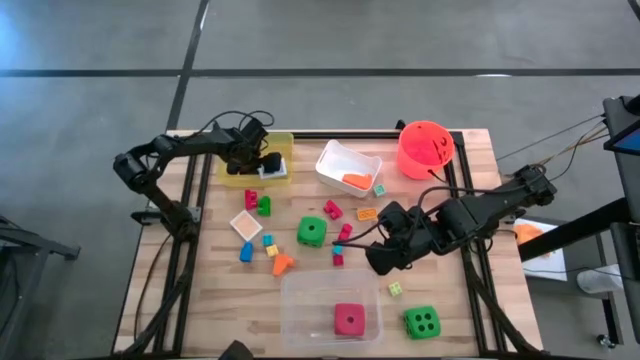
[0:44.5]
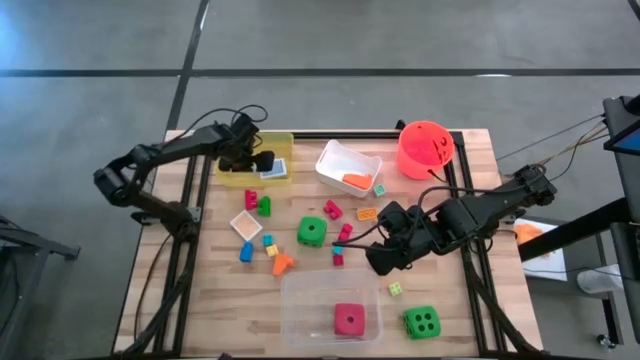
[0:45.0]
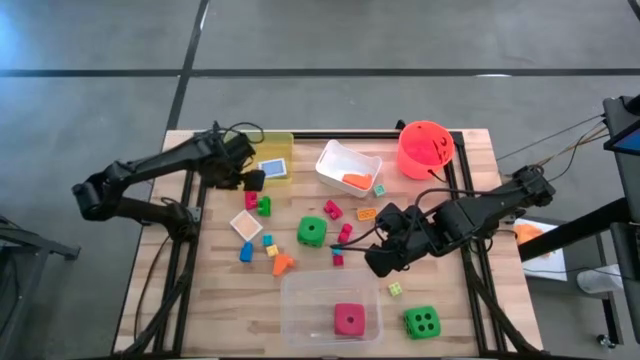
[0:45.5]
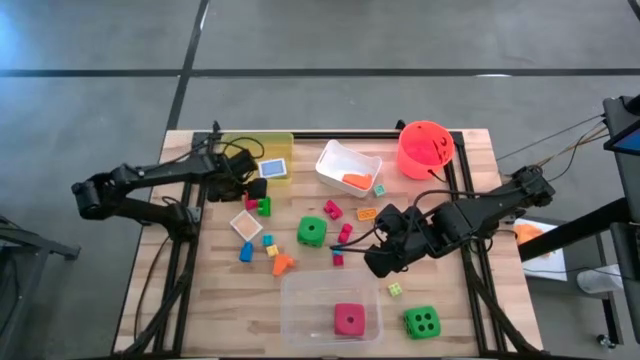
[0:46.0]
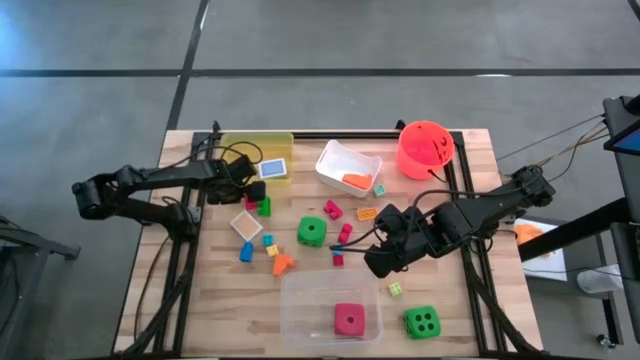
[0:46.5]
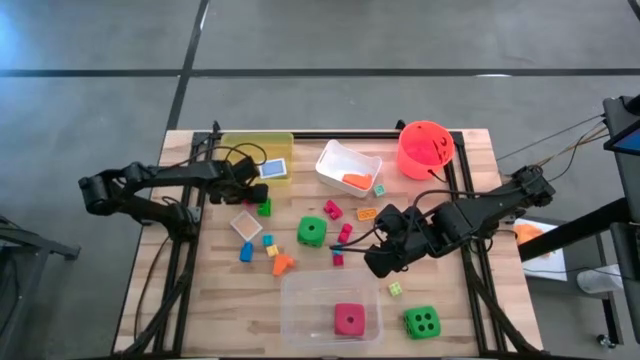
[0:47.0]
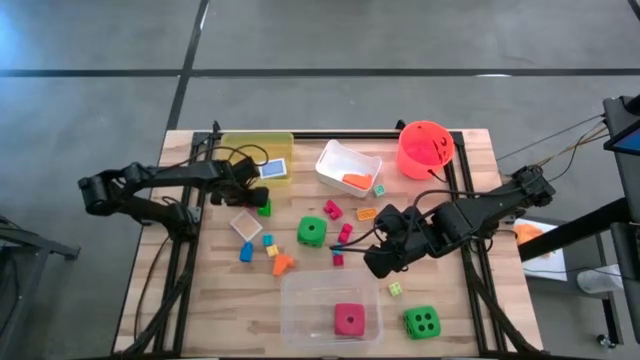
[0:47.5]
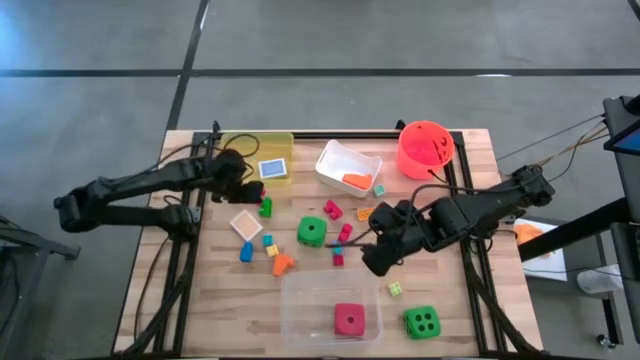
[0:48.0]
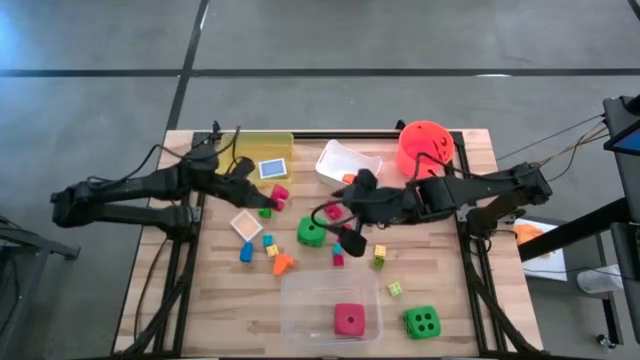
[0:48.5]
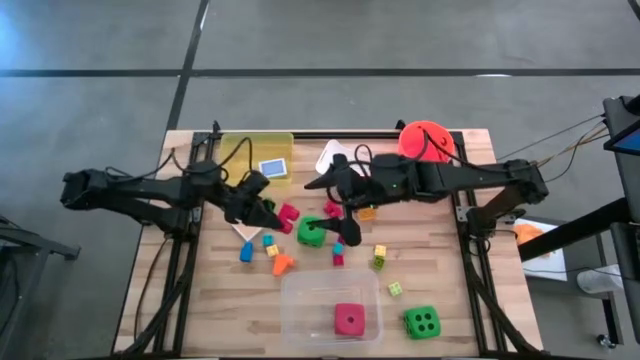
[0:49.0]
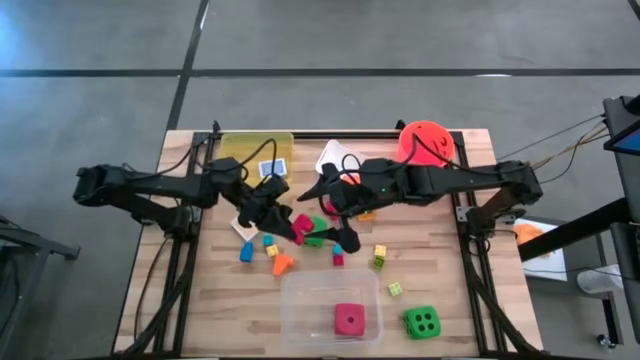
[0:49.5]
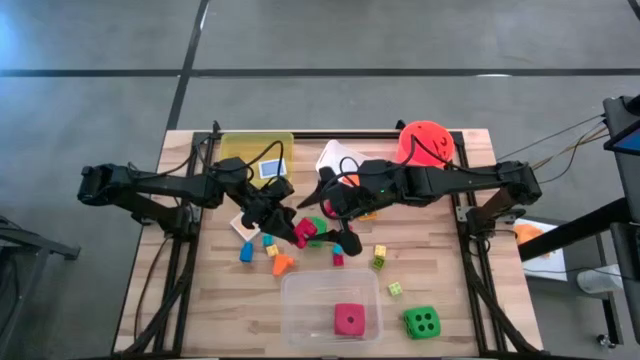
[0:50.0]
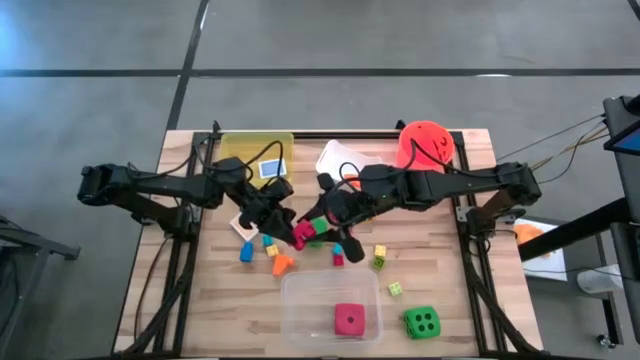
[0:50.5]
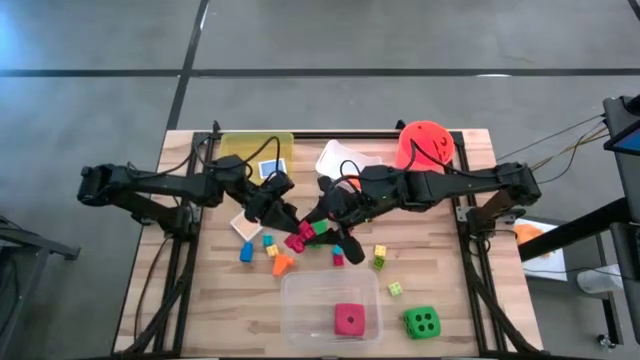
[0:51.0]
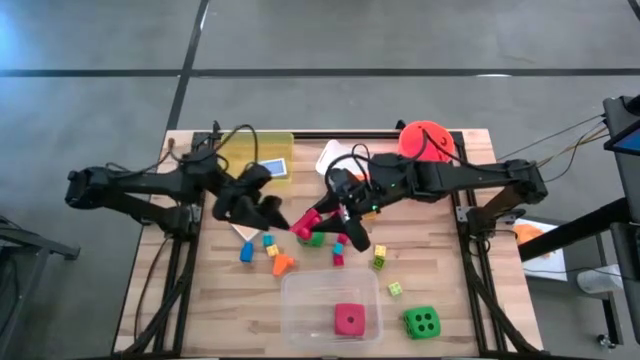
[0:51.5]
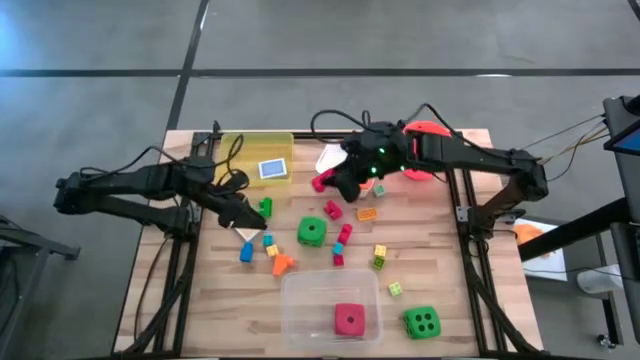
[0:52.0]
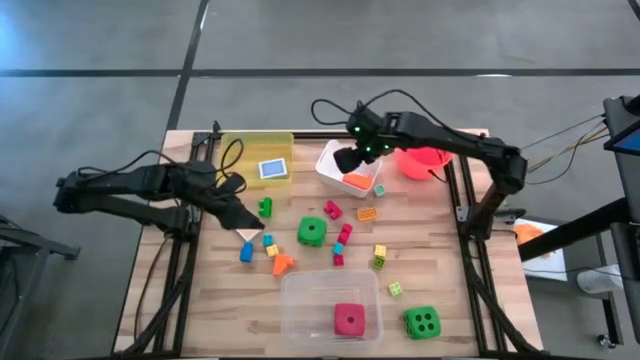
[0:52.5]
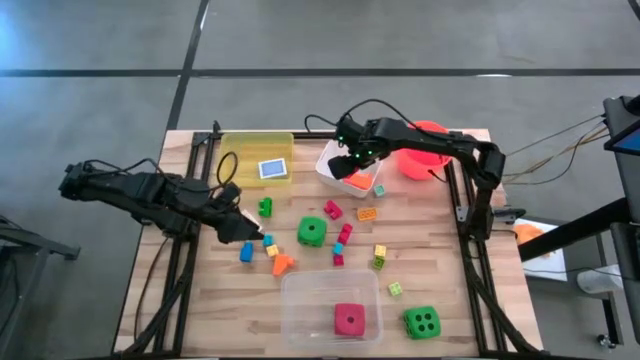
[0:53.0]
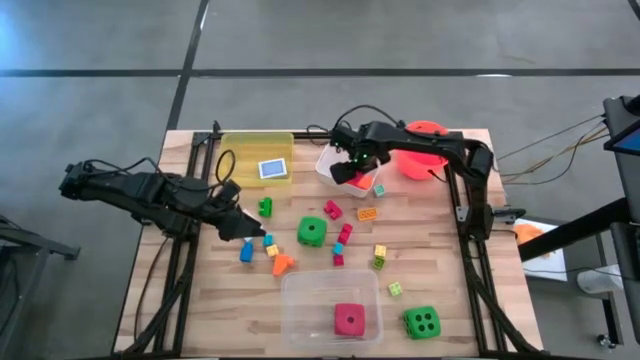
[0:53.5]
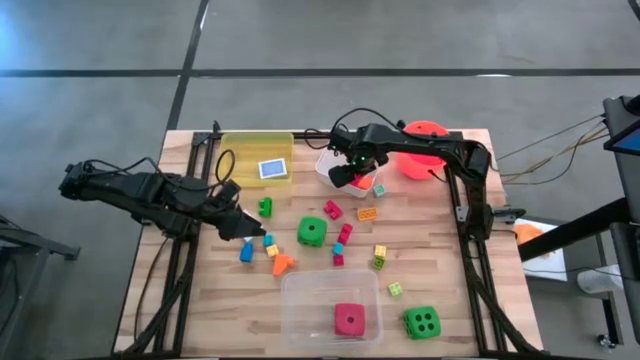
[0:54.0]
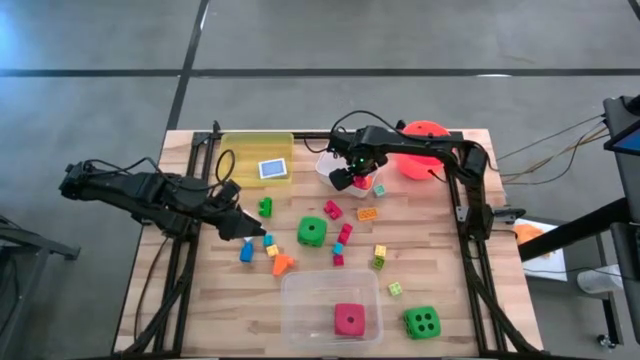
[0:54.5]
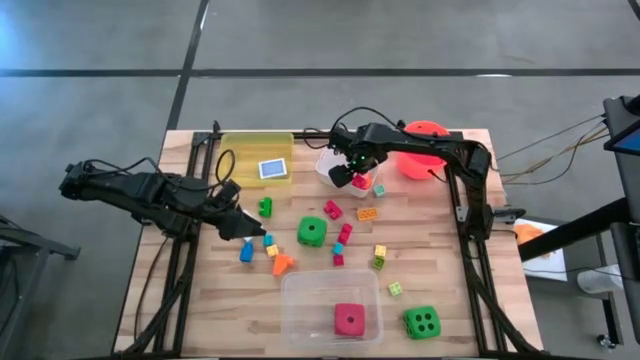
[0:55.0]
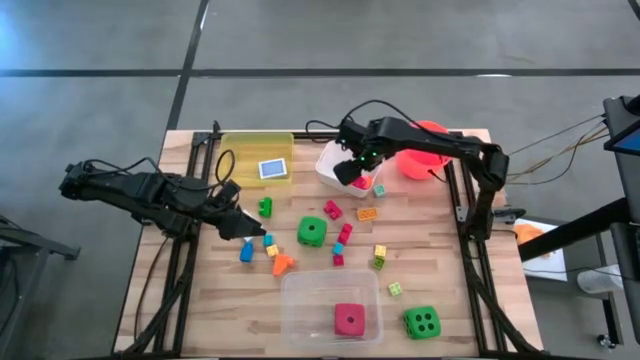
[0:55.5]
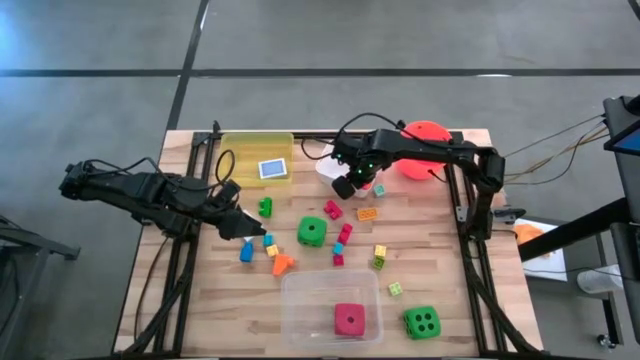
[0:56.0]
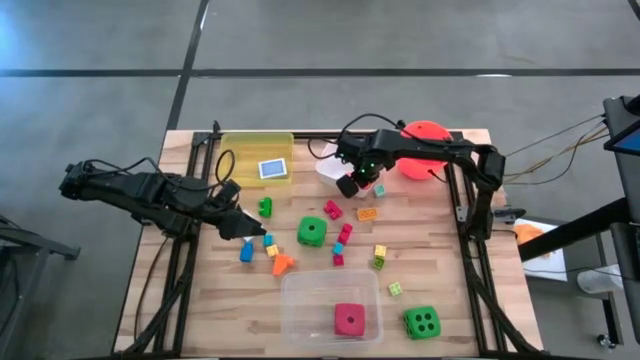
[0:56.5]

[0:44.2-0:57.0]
Task: Pick & Place Toys
Put the red game piece into the white bin

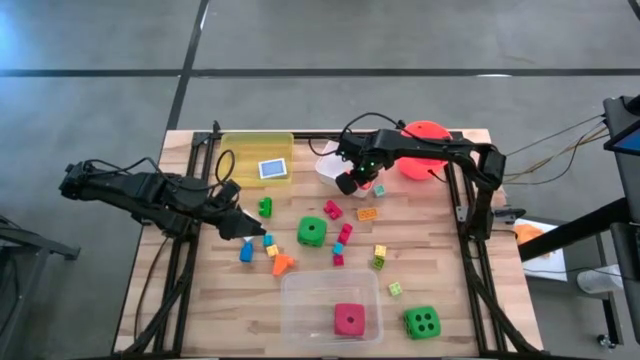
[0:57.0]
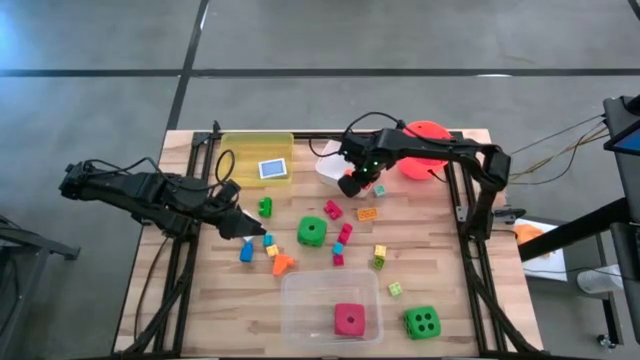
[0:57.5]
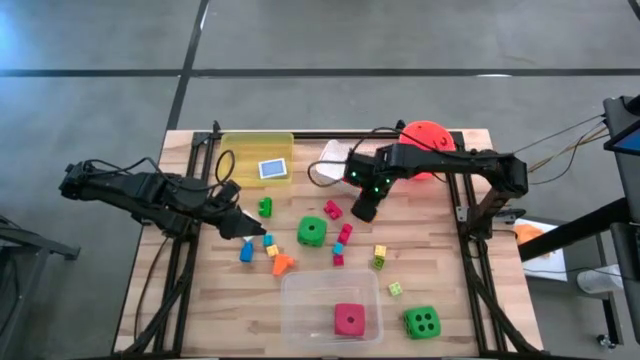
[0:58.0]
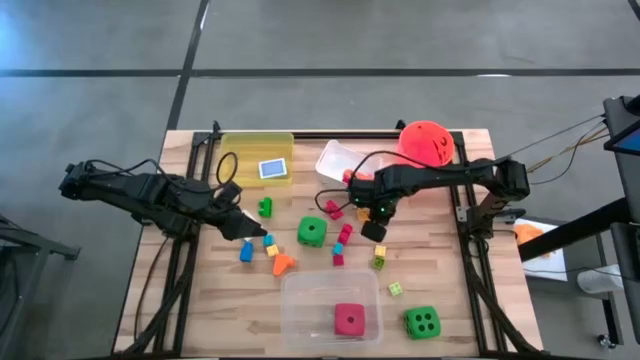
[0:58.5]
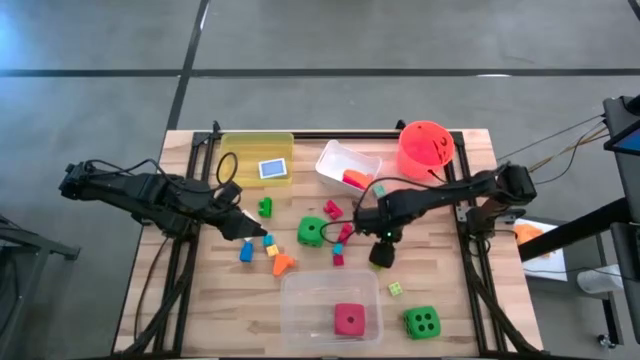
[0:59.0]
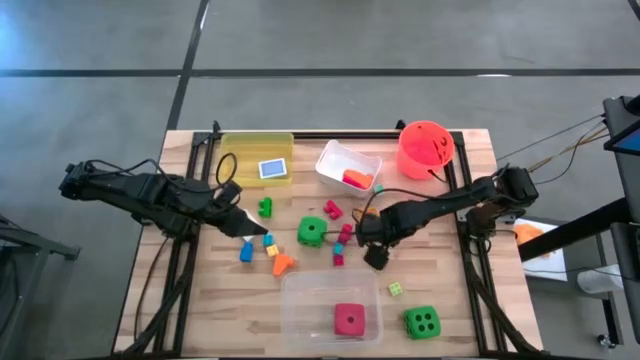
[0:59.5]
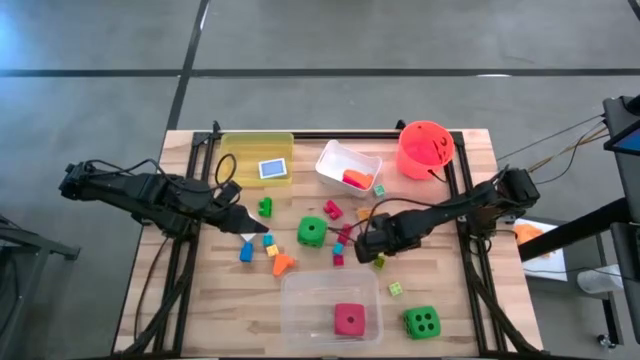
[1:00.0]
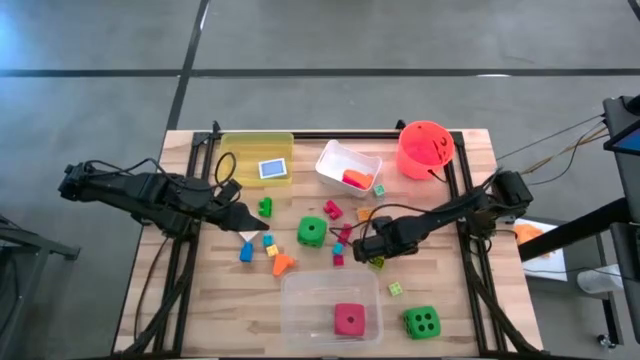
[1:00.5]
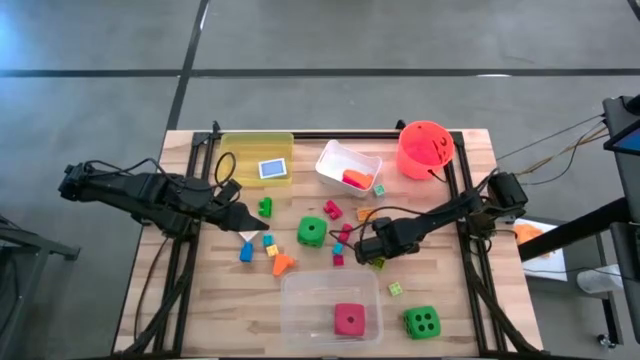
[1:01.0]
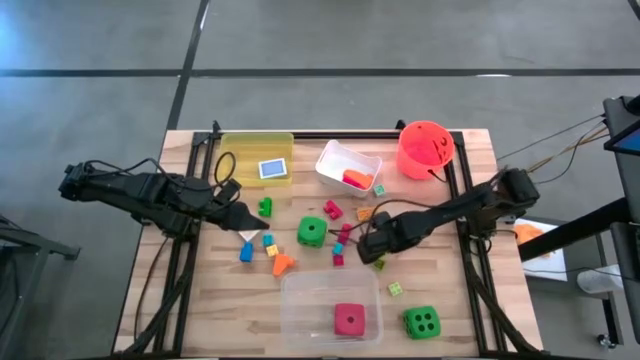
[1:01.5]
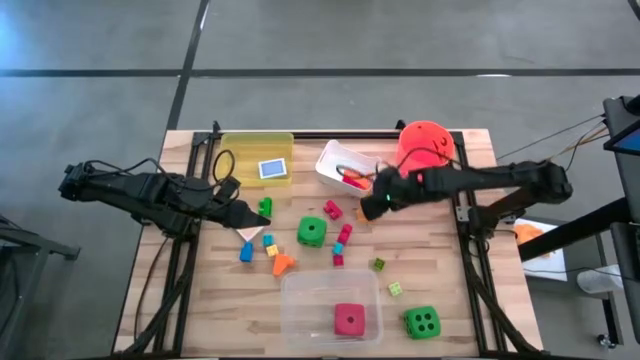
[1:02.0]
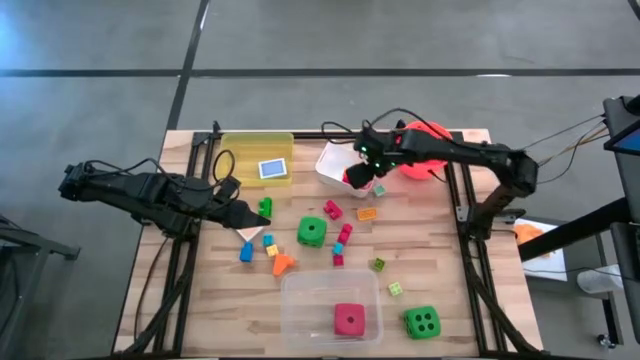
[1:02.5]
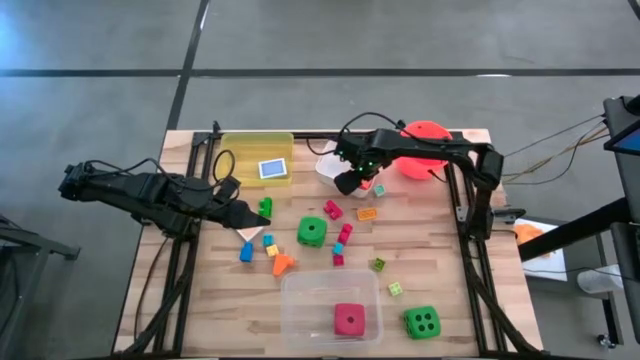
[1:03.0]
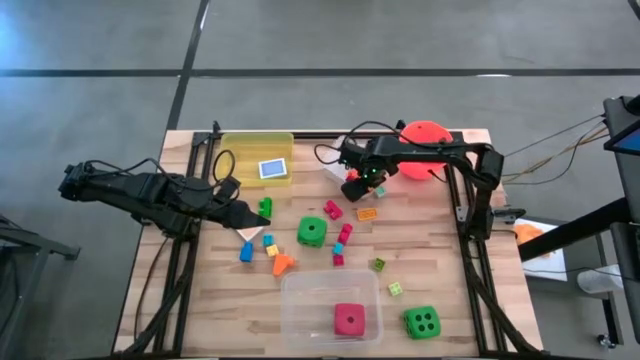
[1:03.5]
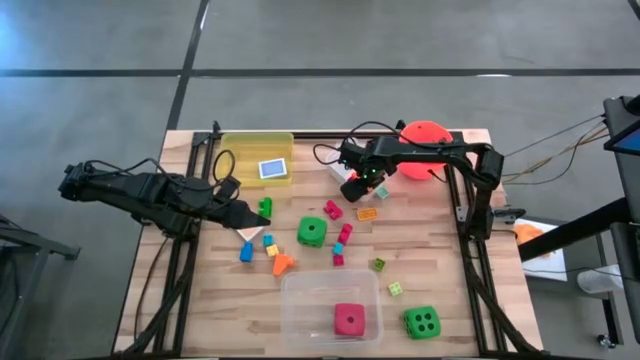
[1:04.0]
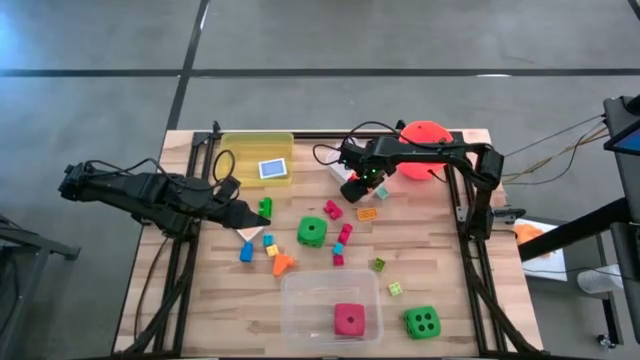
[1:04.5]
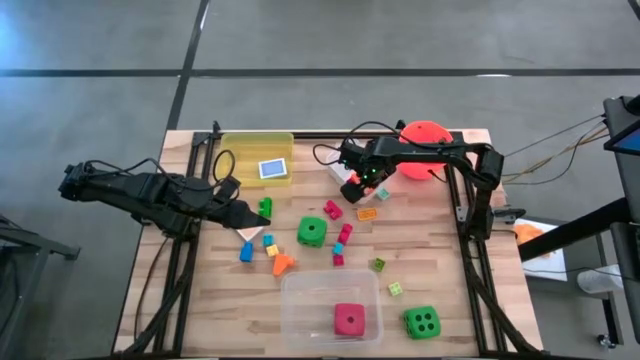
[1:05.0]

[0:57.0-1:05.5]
Put the yellow game piece into the white bin
